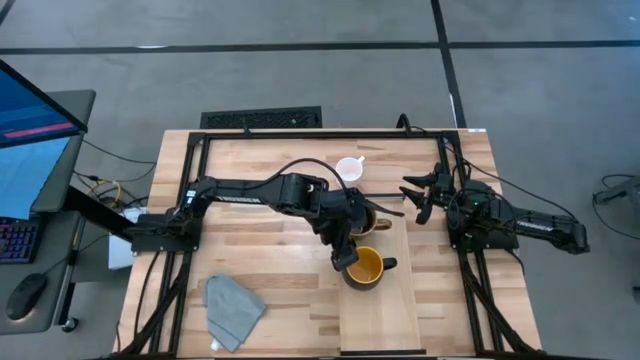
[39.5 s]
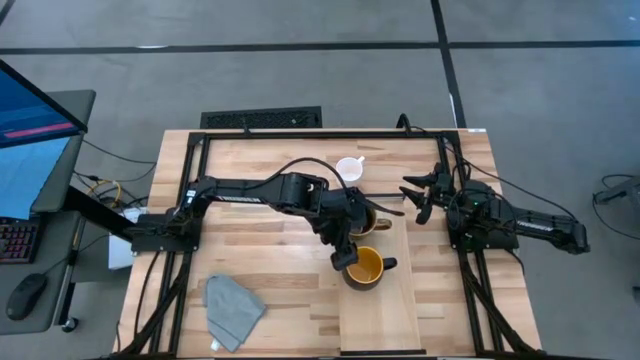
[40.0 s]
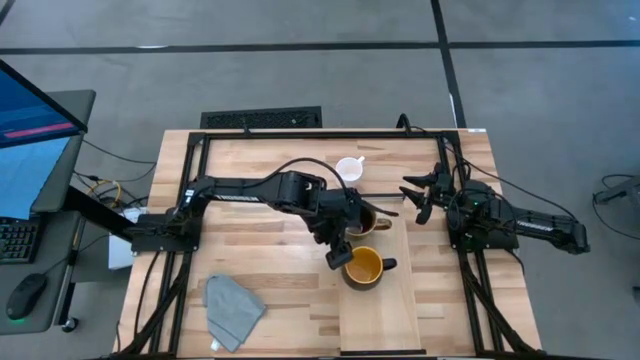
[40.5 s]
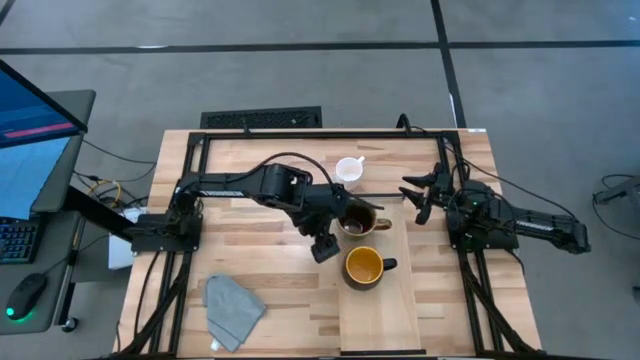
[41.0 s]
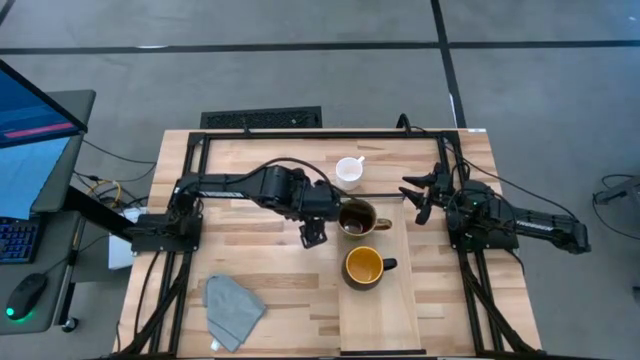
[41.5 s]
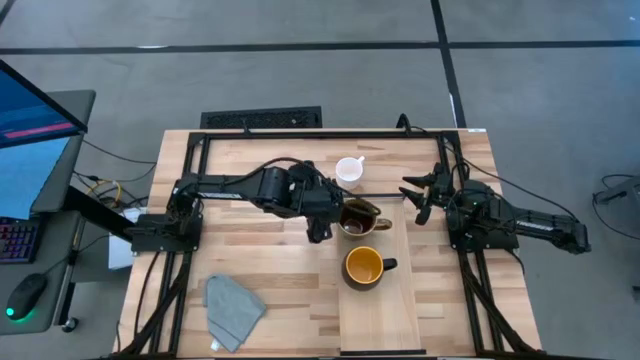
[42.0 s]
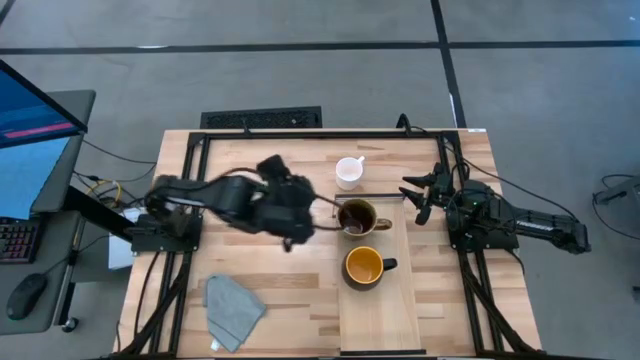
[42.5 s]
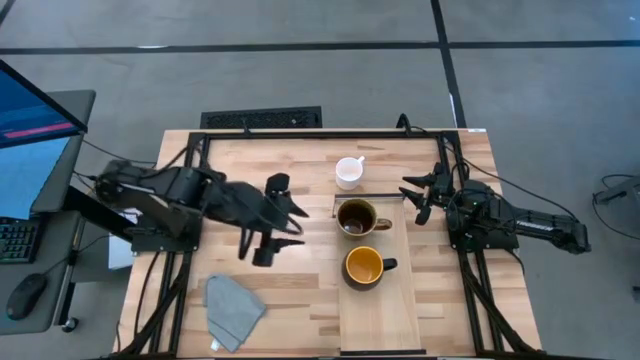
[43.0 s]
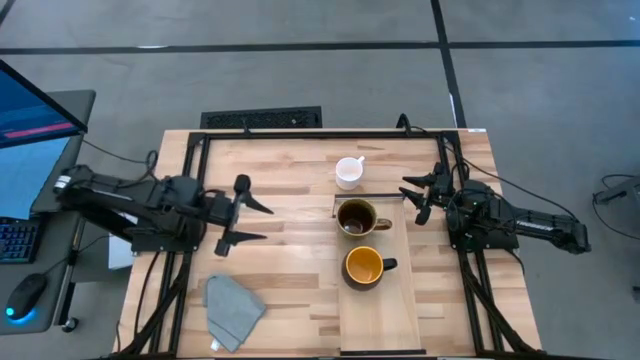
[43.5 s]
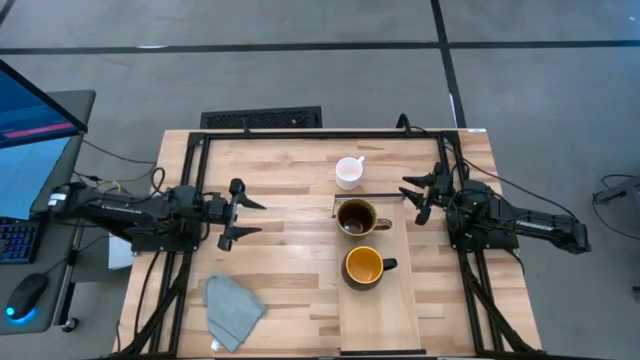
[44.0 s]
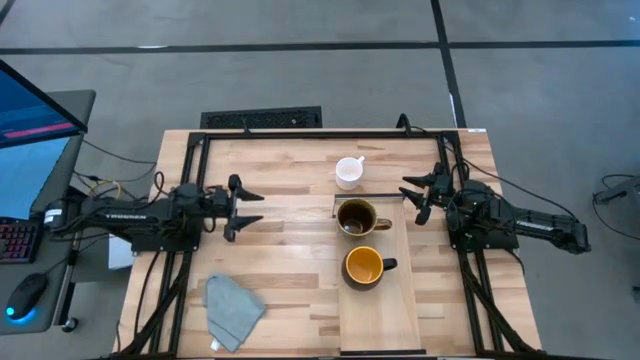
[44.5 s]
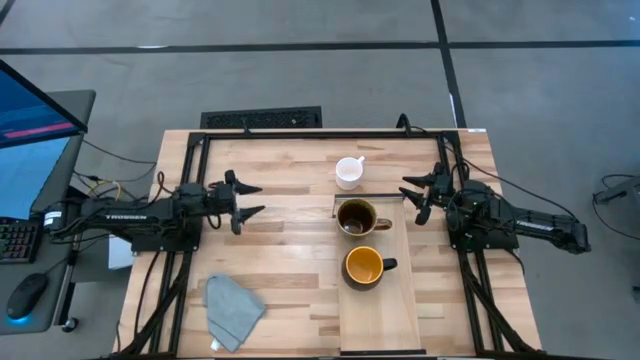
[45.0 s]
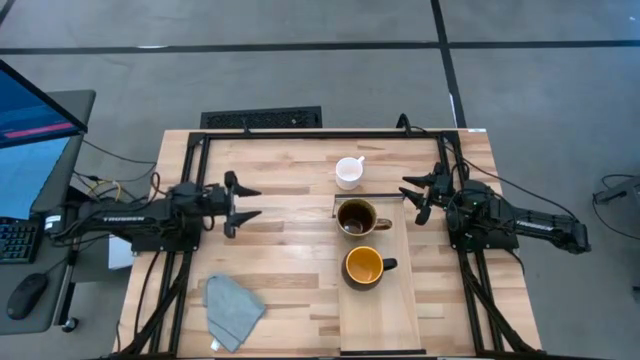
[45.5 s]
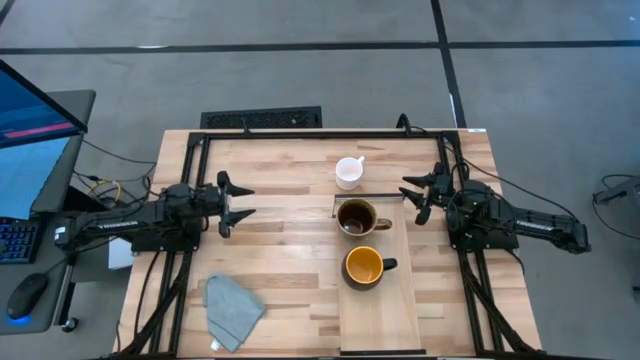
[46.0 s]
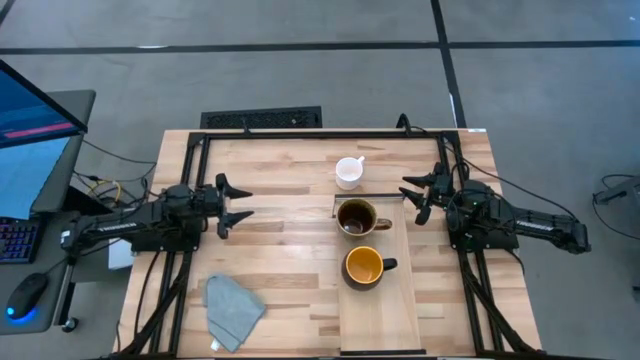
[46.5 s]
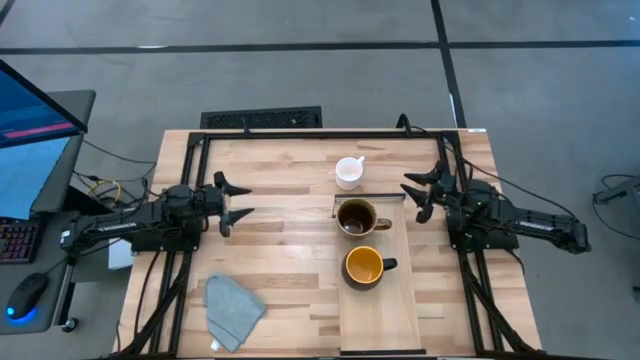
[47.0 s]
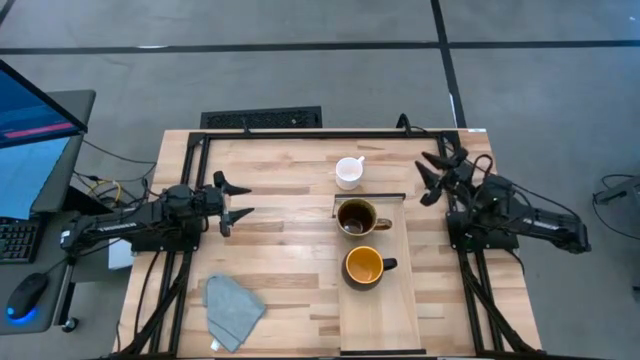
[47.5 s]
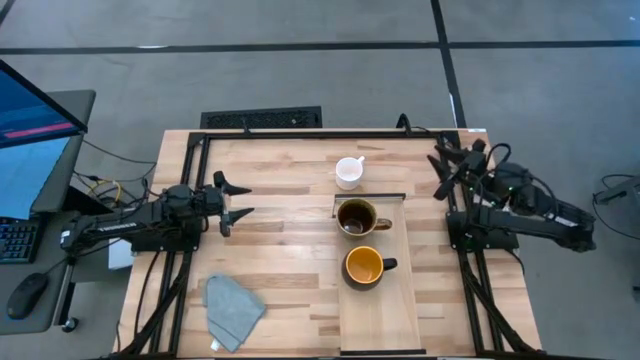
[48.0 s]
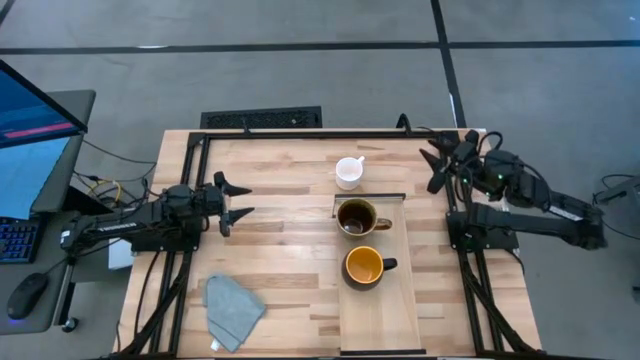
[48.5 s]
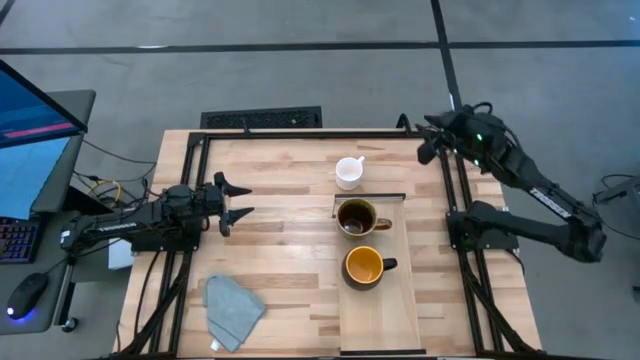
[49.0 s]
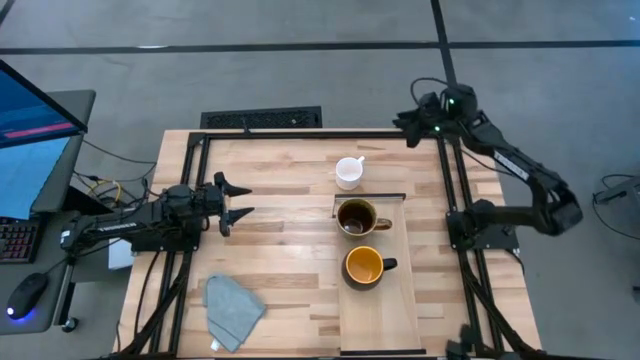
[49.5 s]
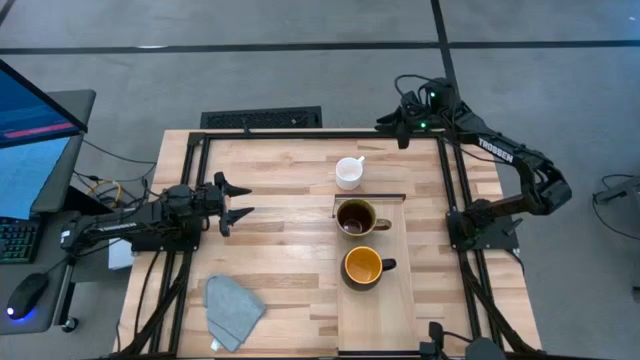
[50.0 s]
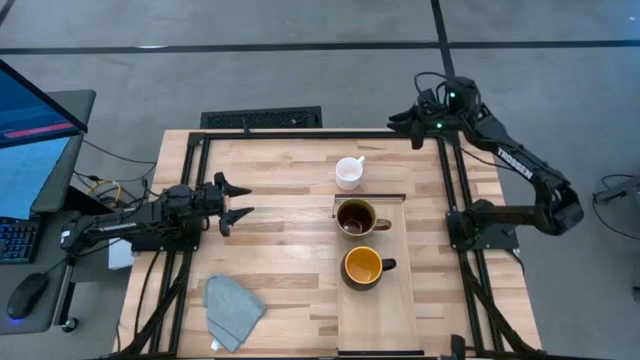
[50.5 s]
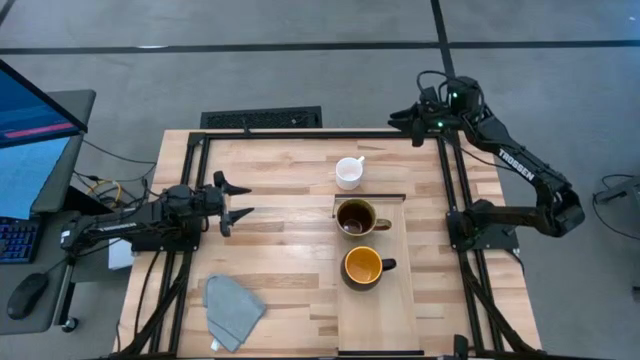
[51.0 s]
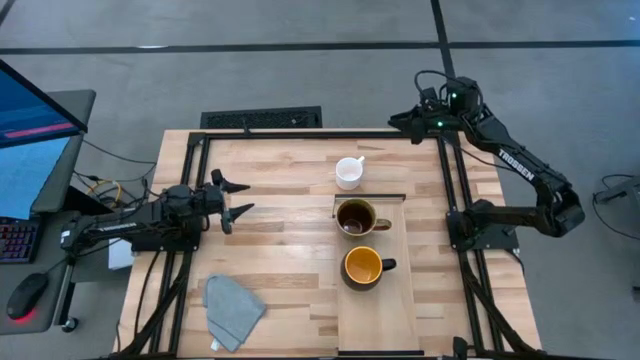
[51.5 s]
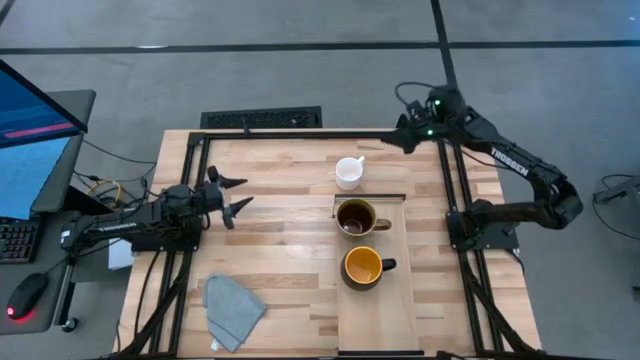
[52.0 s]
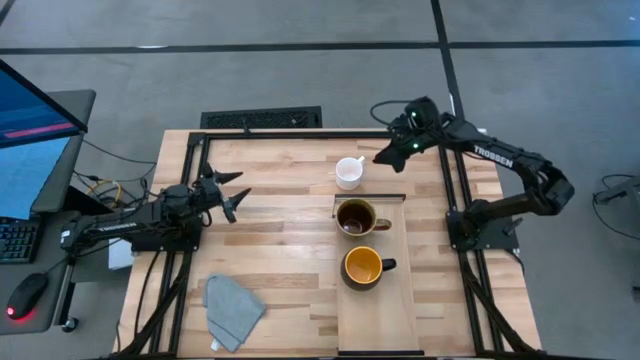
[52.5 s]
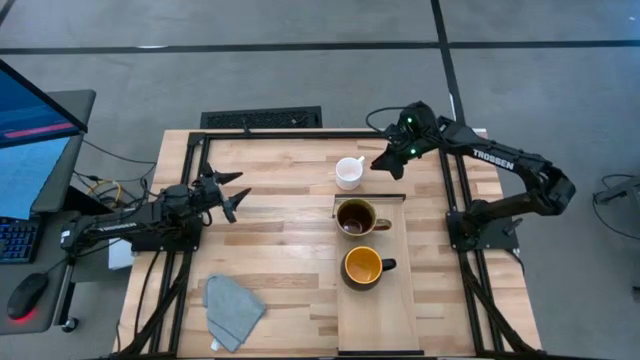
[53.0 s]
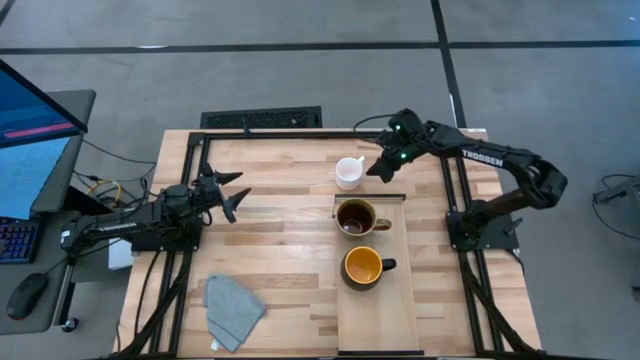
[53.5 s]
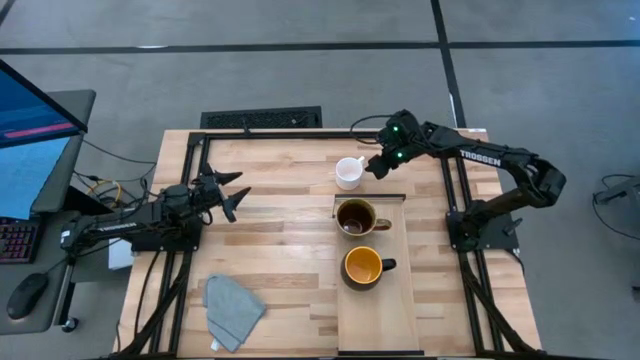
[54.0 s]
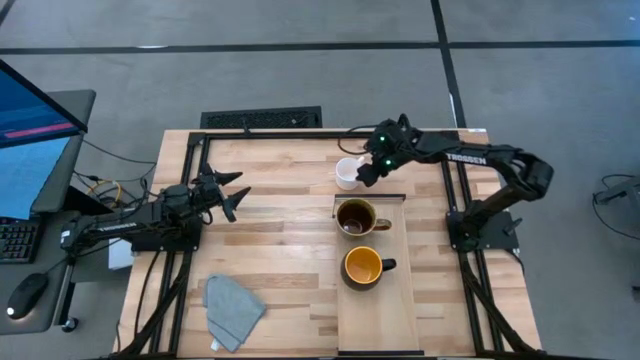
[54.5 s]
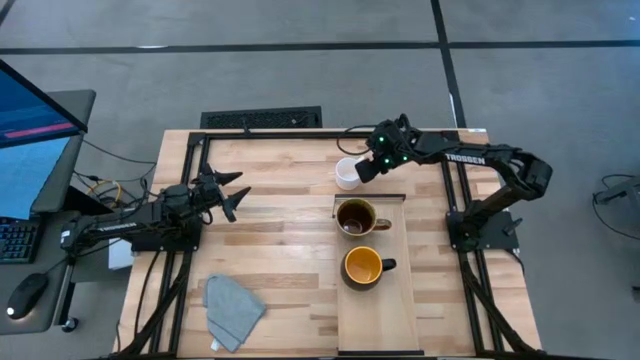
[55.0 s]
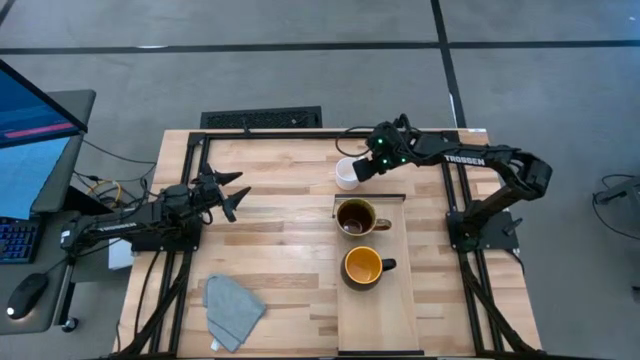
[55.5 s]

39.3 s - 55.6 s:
Task: Stack small to large cups/mugs on shelf
Put the white mug on the shelf

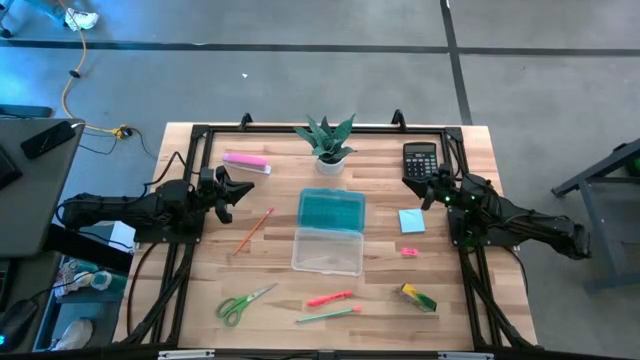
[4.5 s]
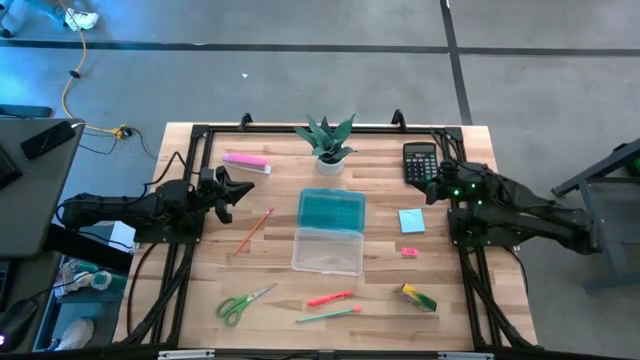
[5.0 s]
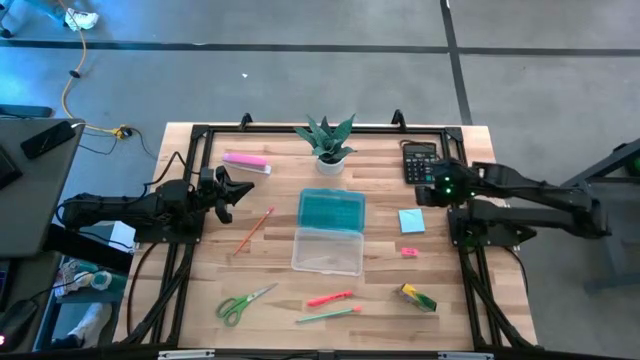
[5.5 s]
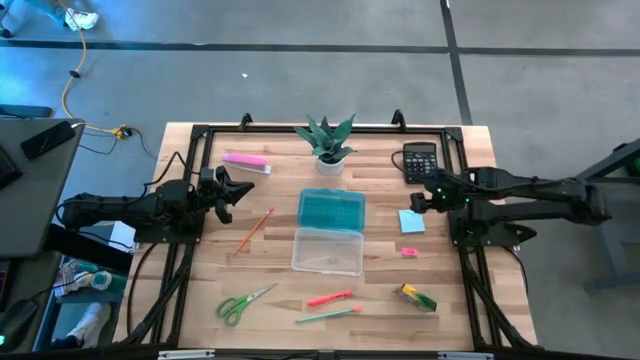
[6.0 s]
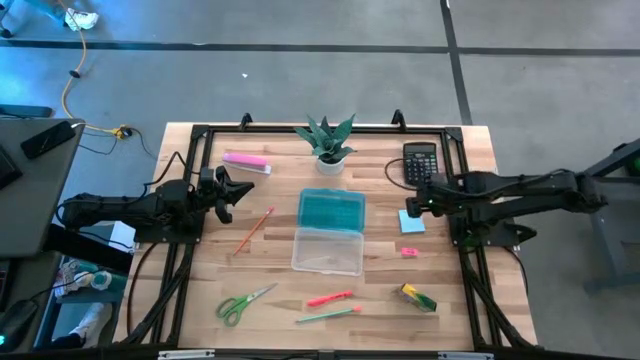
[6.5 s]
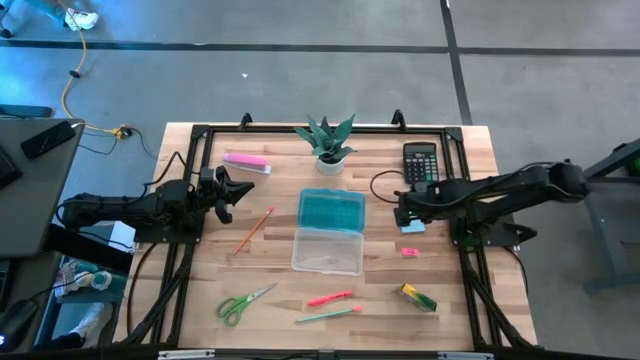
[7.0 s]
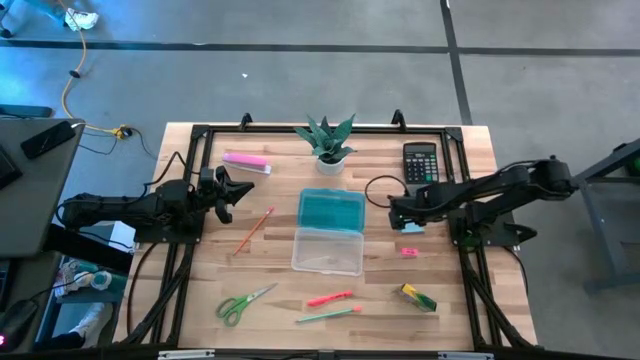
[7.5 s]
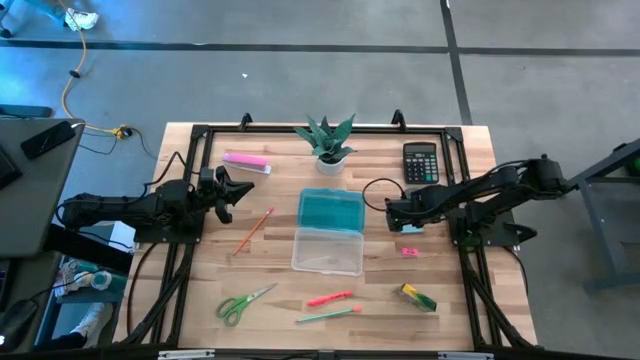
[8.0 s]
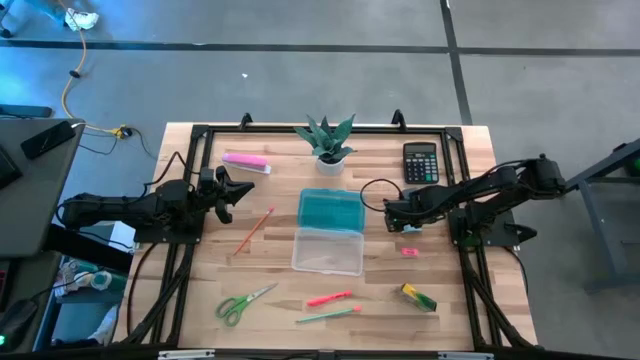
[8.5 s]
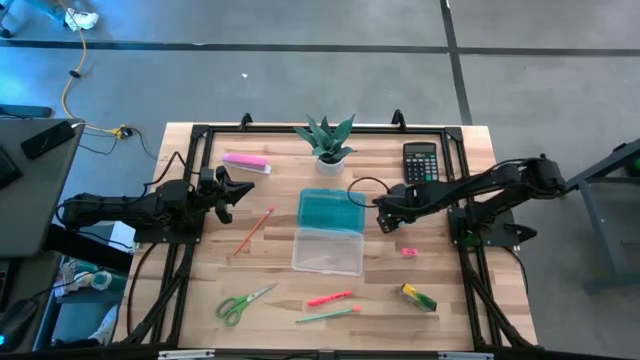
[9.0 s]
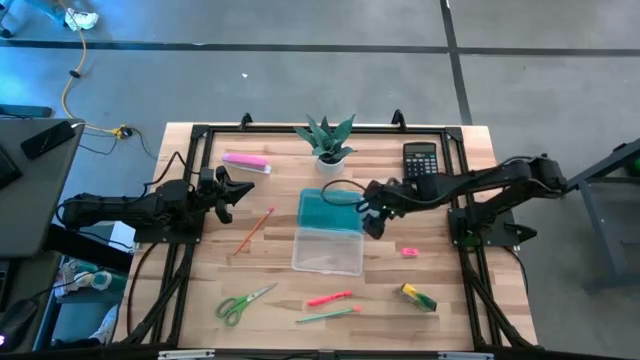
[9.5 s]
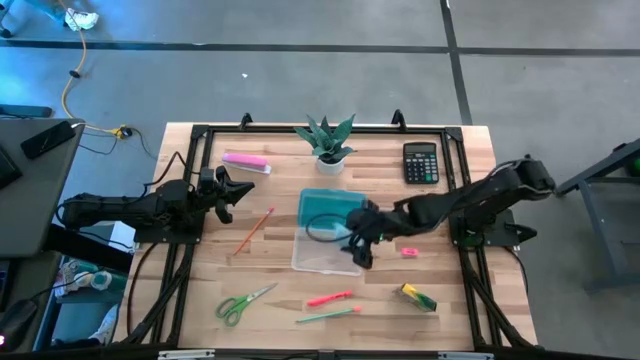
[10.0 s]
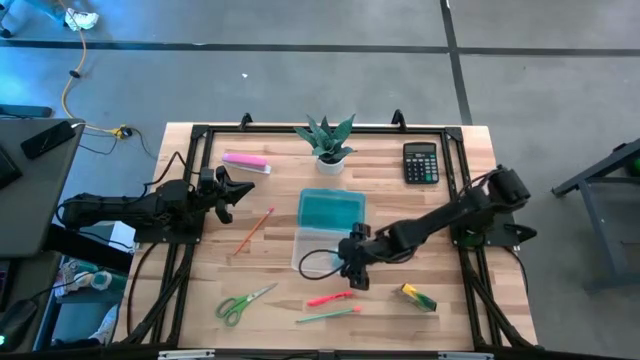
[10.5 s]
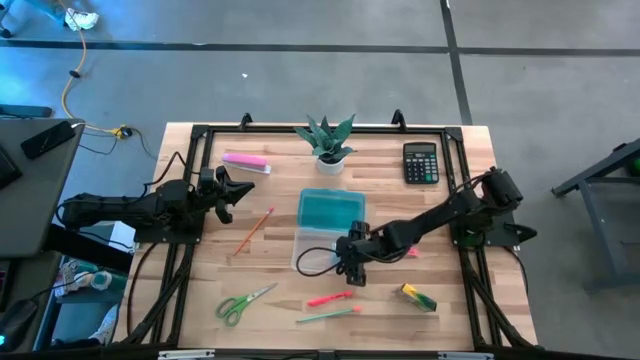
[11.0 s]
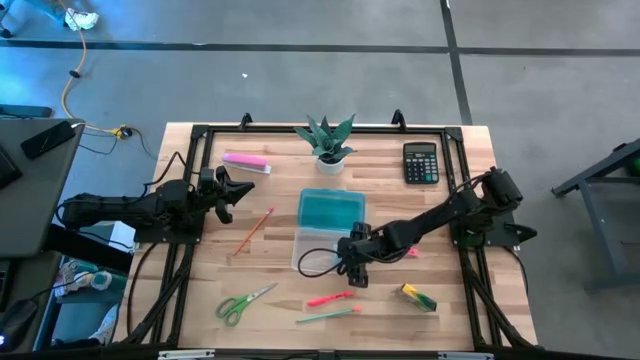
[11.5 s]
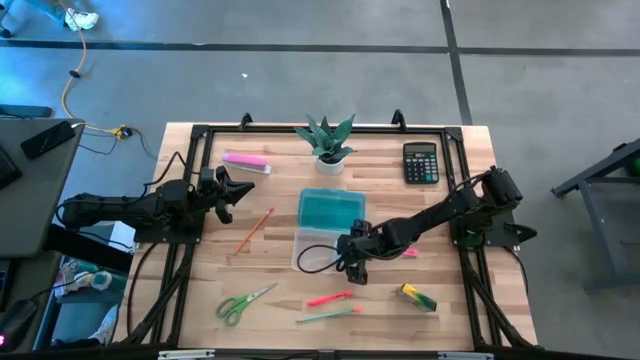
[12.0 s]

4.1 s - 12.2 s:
Task: Pack school essentials
Put the blue sticky notes into the blue supply box
